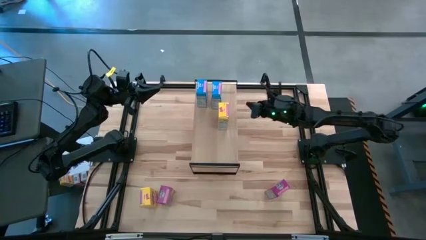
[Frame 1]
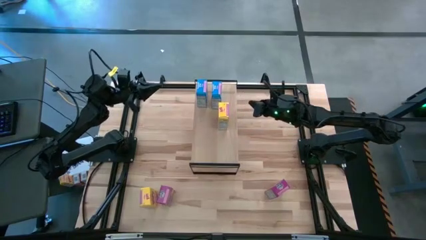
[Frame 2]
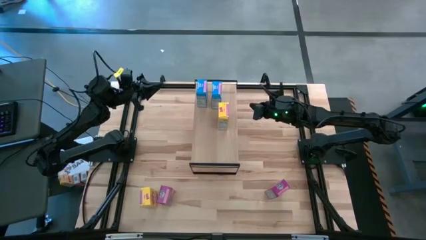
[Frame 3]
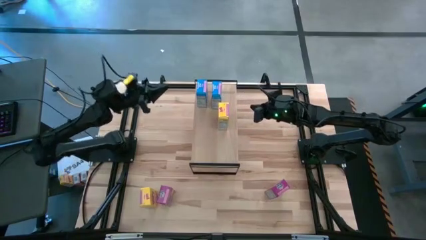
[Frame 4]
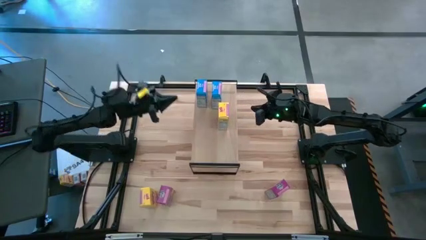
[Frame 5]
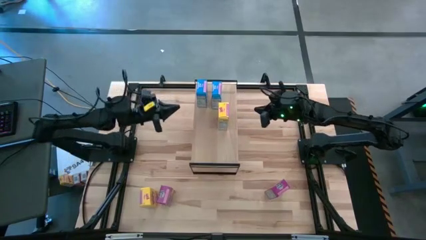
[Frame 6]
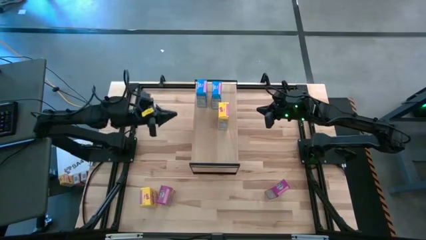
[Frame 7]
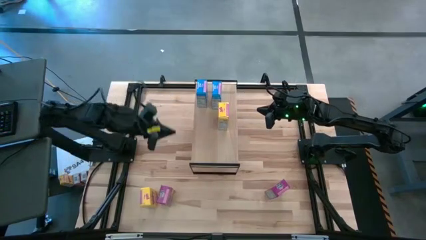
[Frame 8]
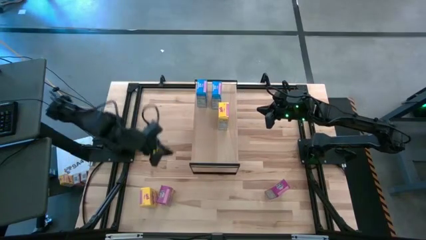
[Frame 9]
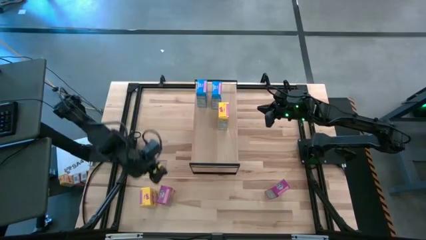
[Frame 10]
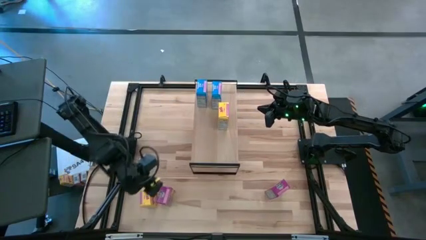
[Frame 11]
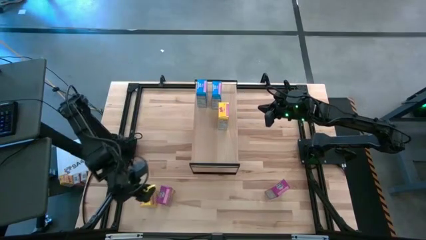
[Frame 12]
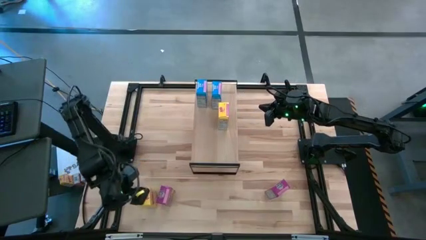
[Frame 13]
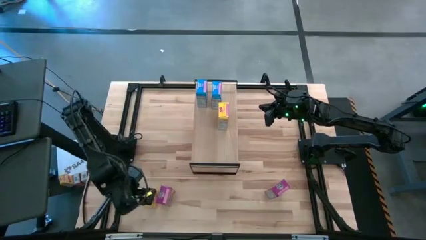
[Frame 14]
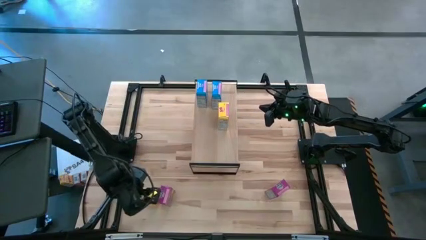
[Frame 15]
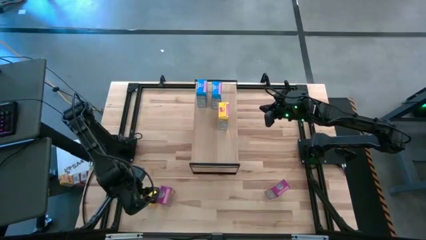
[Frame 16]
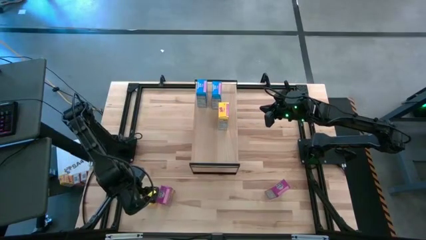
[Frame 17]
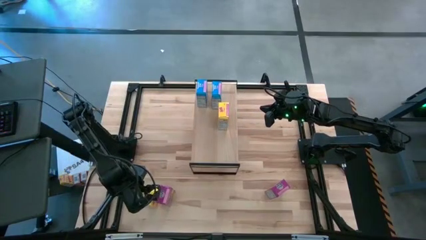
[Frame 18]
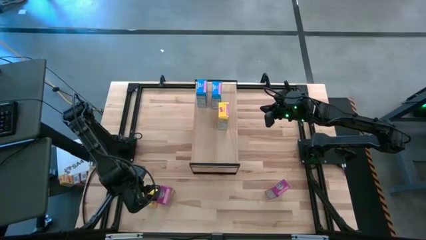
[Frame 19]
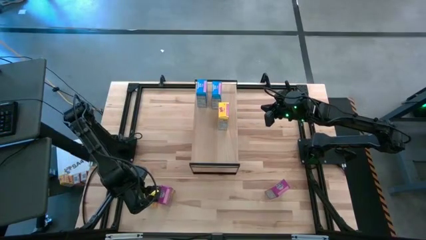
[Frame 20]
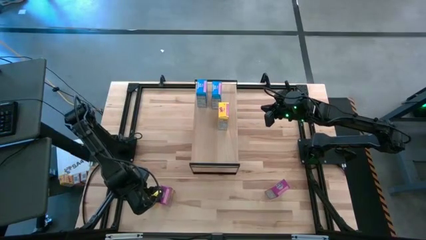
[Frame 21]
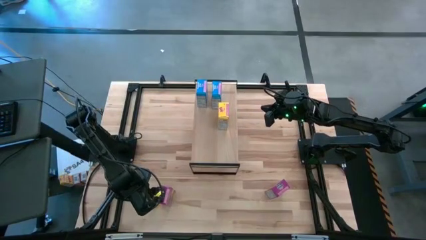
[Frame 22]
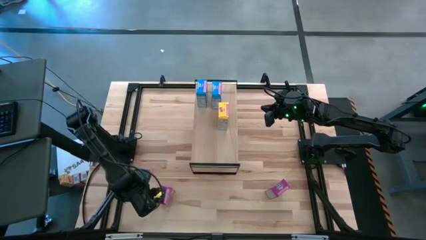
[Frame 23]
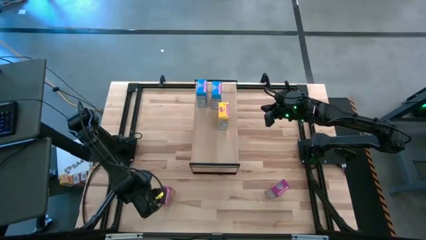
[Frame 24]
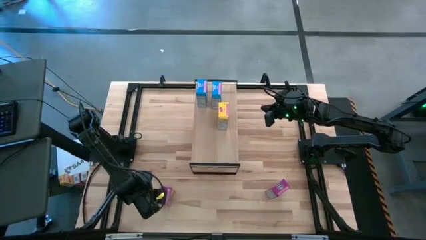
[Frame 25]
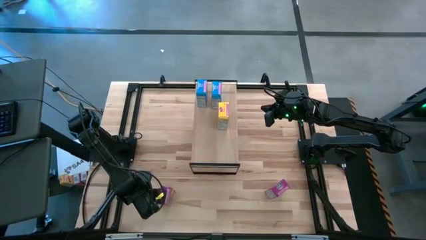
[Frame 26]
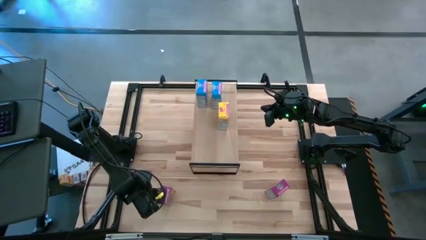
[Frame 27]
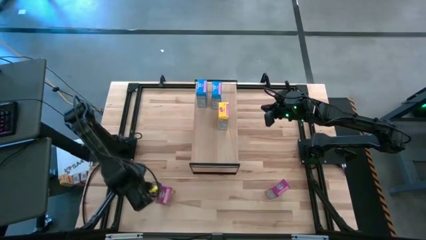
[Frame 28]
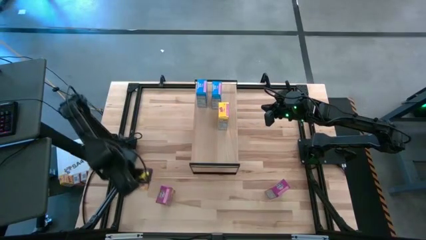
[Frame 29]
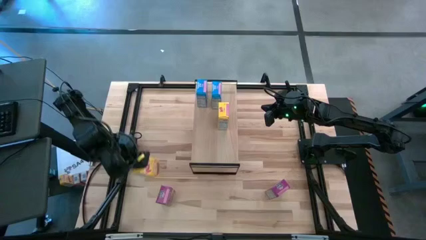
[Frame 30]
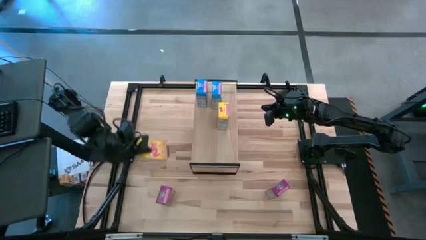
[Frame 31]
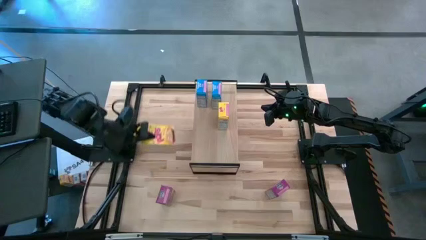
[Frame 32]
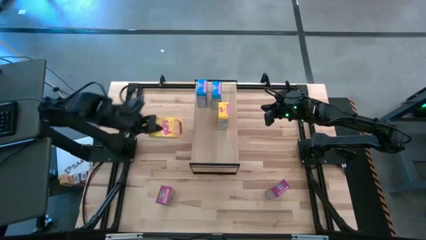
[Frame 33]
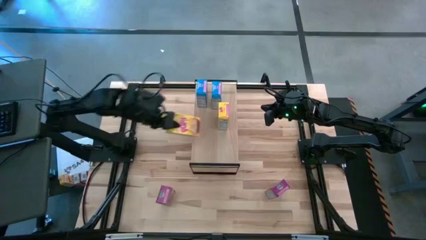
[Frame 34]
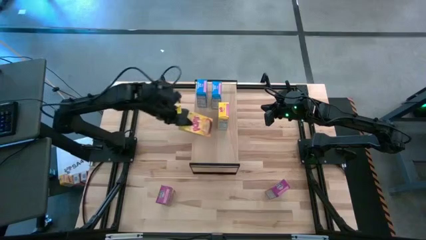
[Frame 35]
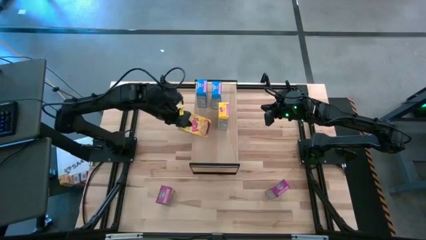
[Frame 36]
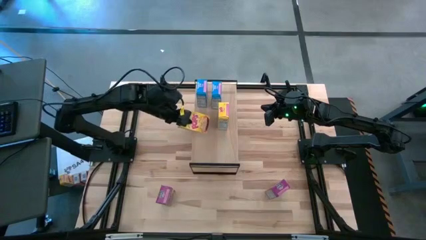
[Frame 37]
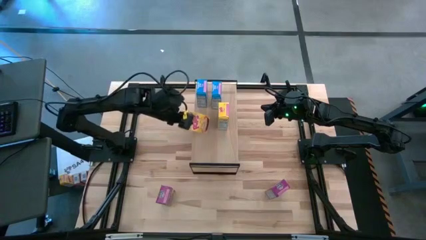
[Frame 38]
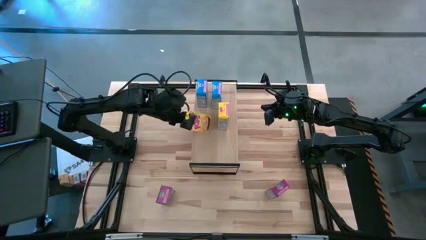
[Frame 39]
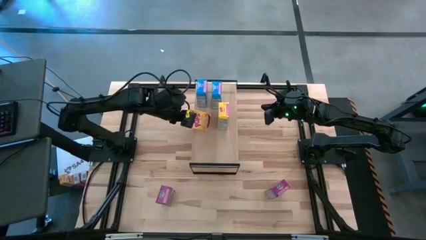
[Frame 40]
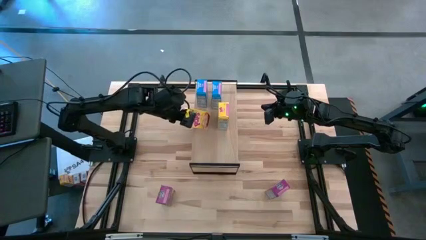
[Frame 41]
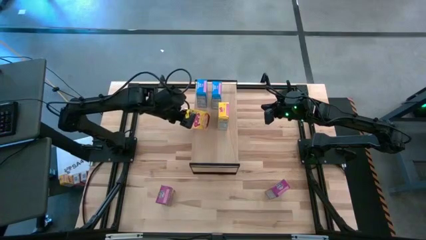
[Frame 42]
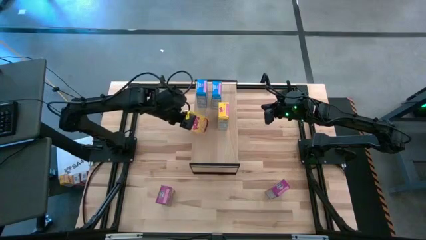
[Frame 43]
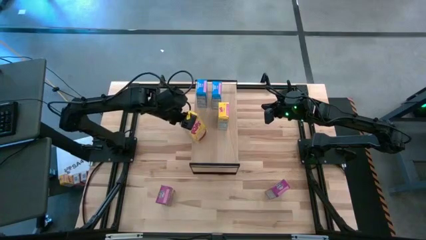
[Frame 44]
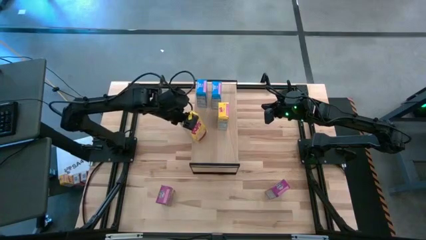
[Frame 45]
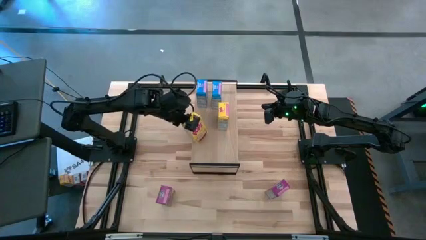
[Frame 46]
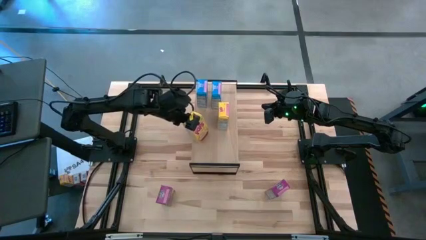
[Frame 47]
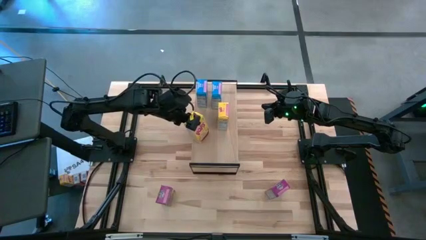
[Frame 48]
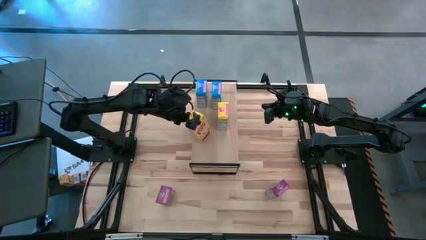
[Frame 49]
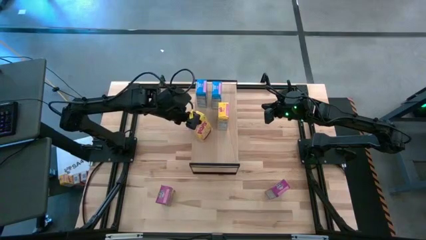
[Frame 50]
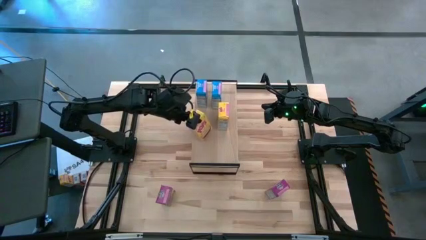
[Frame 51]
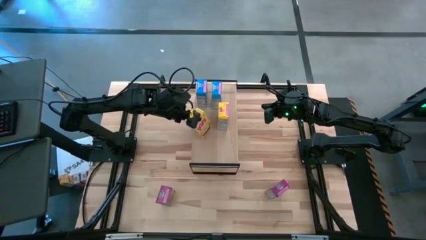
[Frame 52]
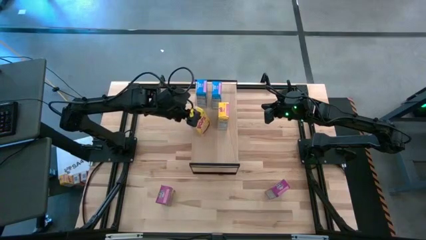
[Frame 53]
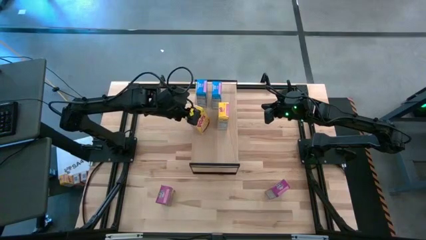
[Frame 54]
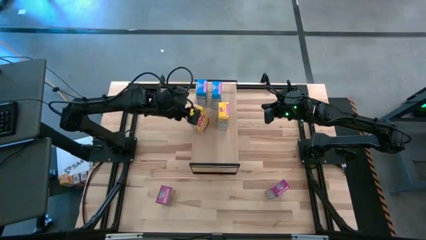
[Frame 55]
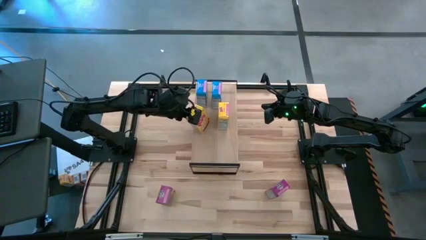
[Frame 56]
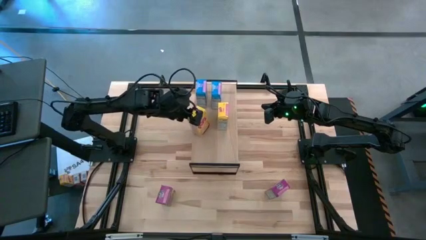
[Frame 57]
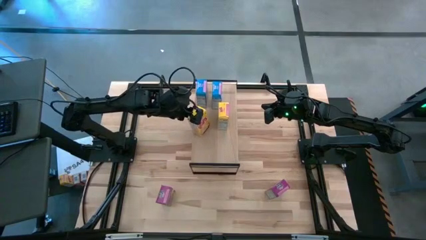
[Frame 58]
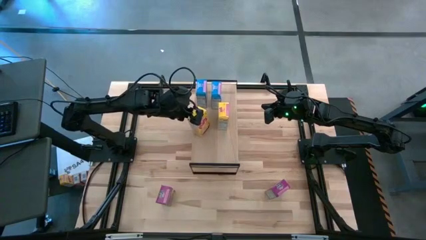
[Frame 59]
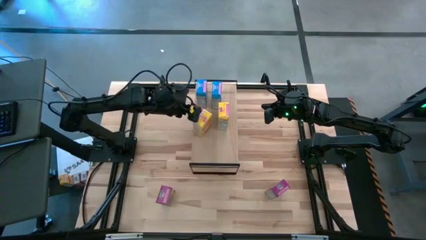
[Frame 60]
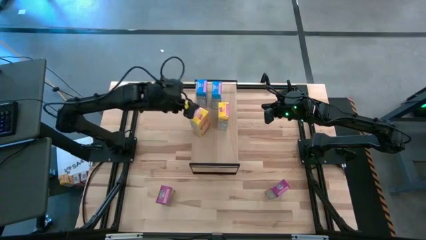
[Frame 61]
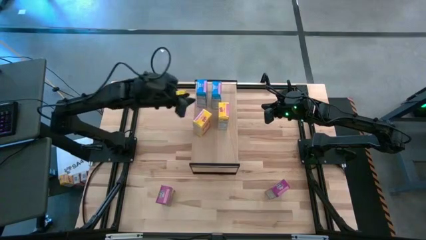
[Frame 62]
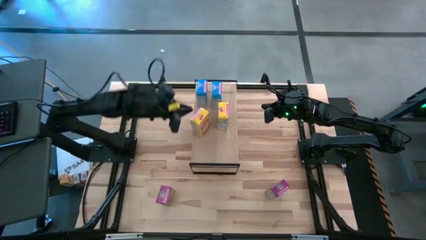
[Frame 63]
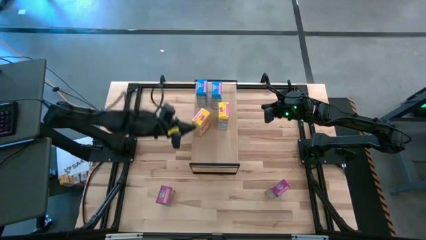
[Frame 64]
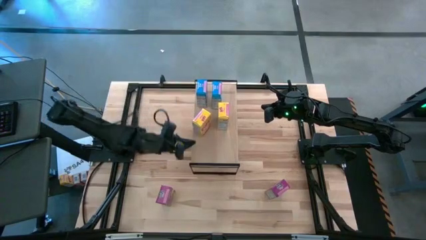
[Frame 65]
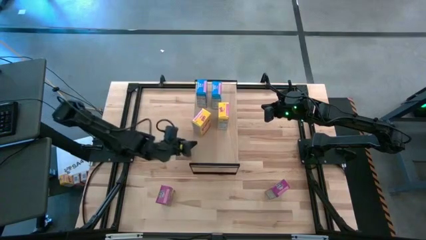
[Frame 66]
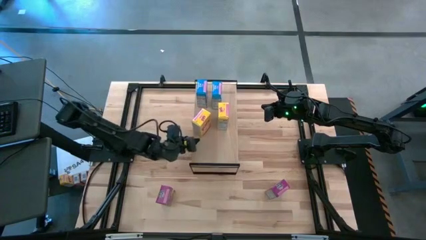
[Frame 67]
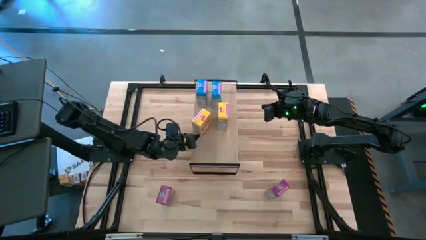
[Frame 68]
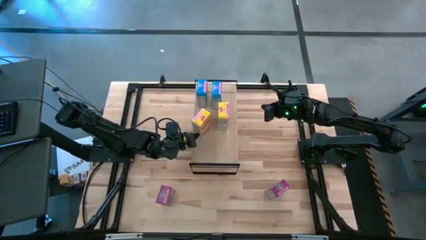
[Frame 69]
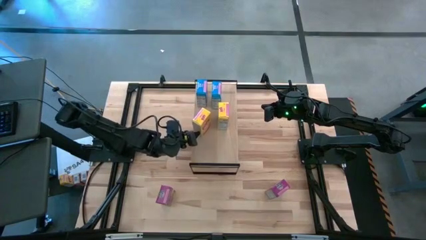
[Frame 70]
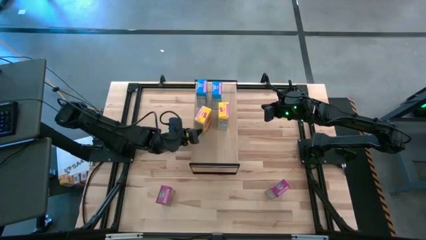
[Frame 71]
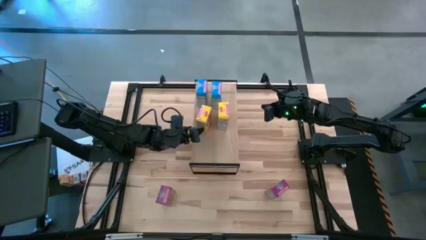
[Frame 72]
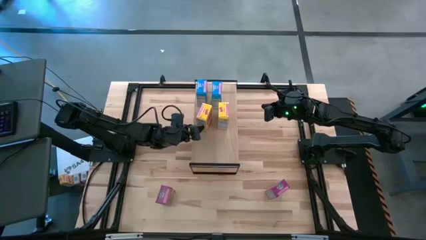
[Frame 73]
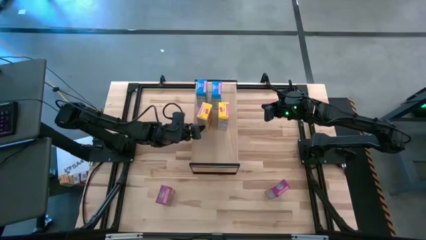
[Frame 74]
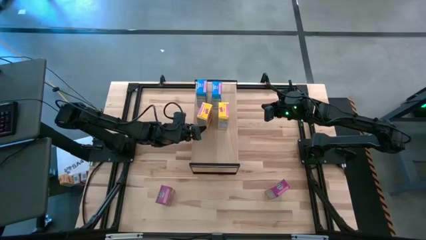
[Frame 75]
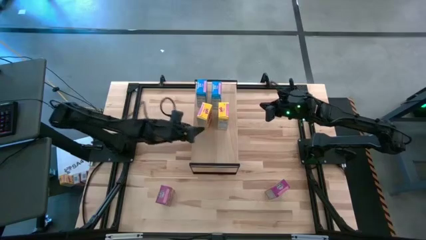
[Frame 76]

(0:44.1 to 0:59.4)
Task: Stack cereal on shelf
Put the yellow cereal box on the shelf
